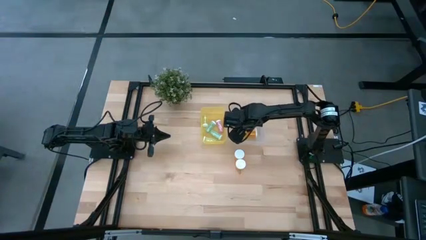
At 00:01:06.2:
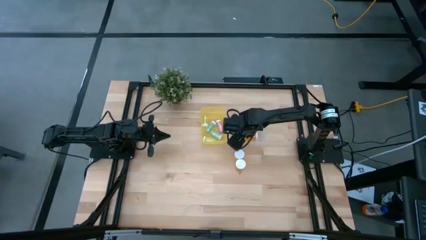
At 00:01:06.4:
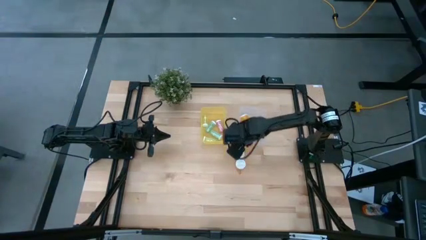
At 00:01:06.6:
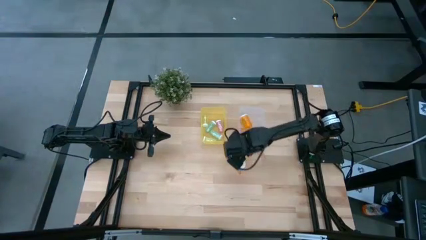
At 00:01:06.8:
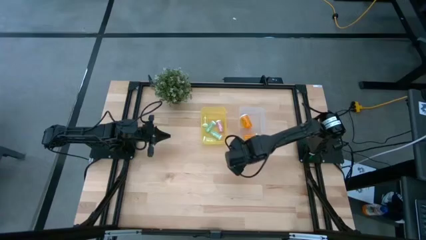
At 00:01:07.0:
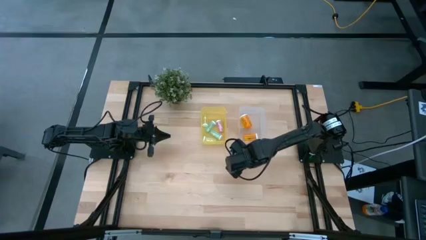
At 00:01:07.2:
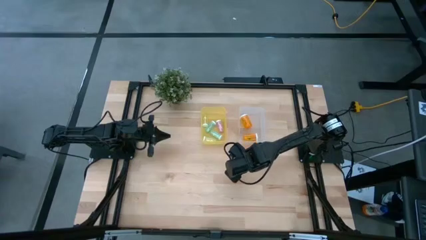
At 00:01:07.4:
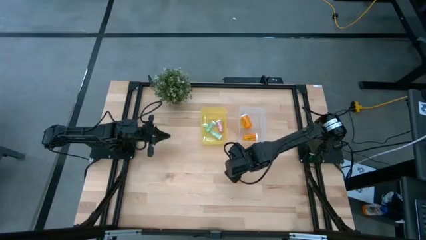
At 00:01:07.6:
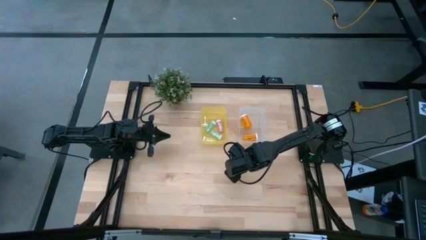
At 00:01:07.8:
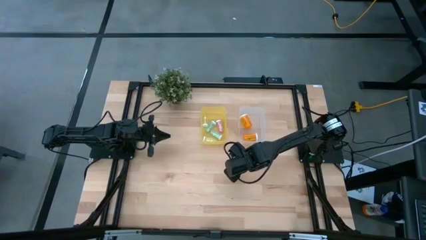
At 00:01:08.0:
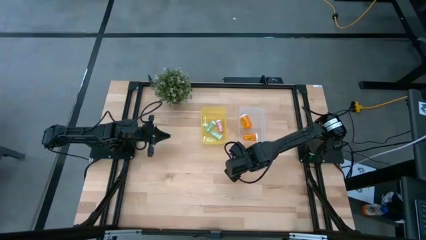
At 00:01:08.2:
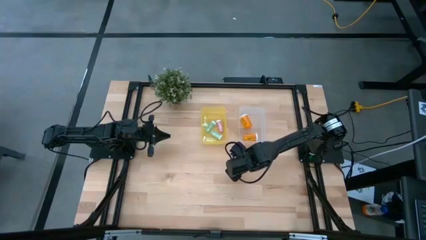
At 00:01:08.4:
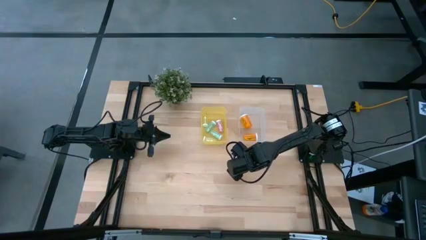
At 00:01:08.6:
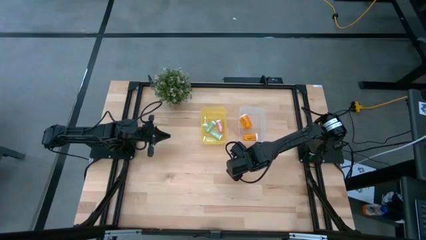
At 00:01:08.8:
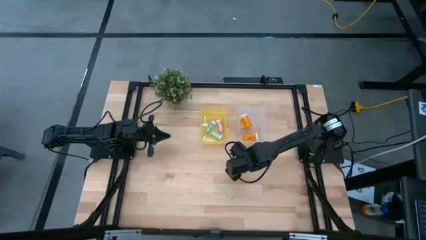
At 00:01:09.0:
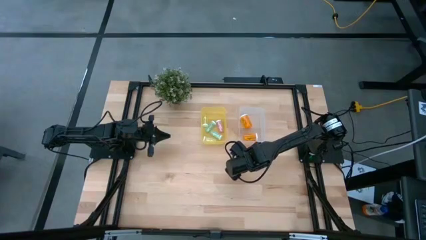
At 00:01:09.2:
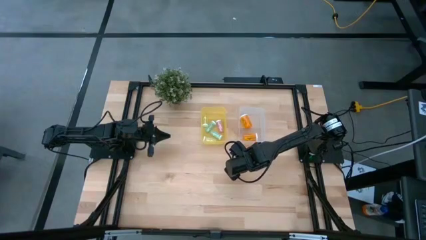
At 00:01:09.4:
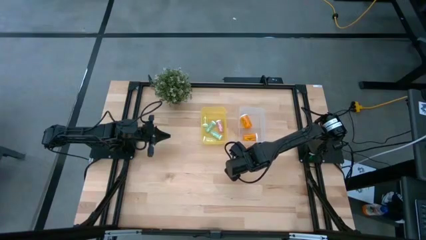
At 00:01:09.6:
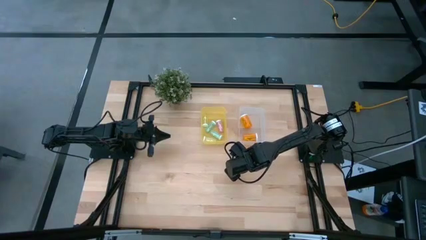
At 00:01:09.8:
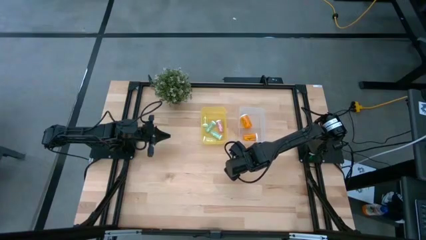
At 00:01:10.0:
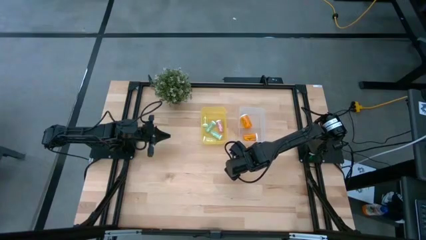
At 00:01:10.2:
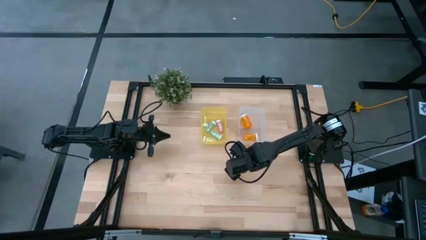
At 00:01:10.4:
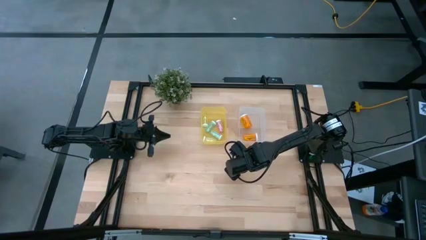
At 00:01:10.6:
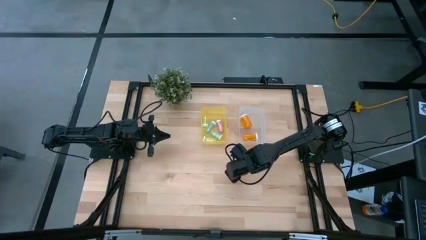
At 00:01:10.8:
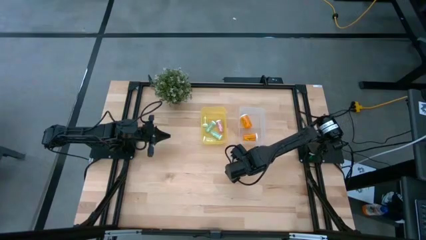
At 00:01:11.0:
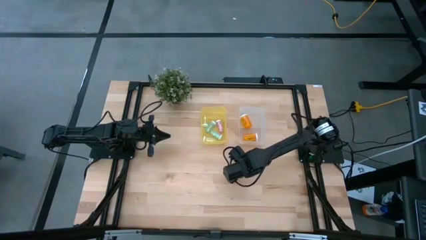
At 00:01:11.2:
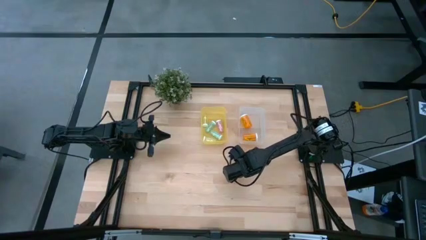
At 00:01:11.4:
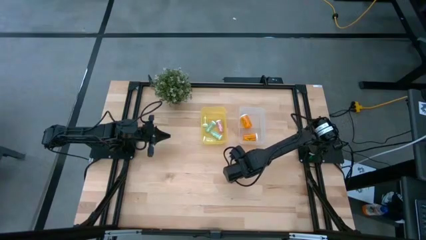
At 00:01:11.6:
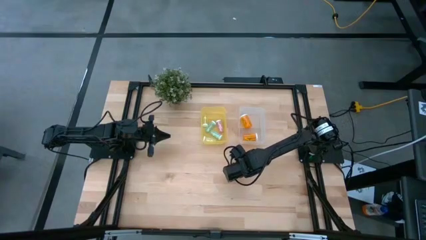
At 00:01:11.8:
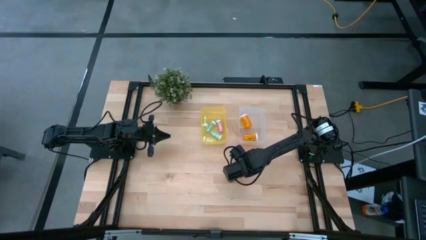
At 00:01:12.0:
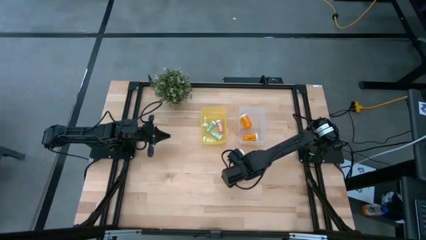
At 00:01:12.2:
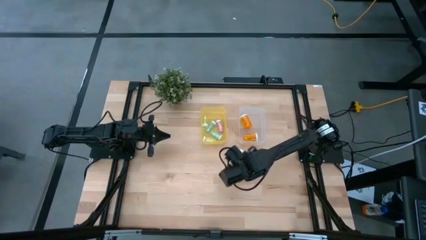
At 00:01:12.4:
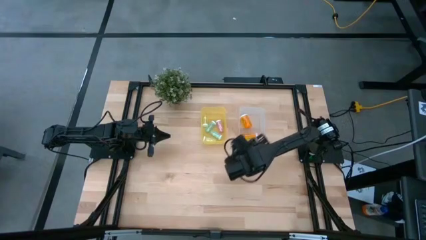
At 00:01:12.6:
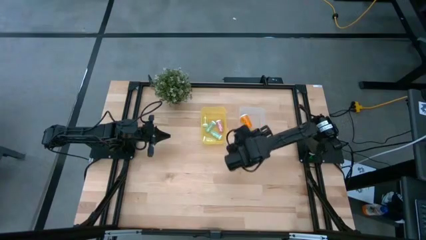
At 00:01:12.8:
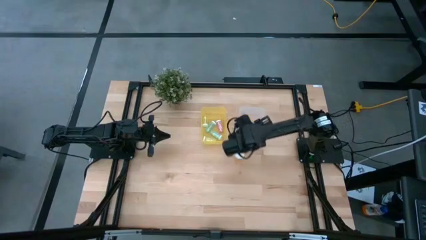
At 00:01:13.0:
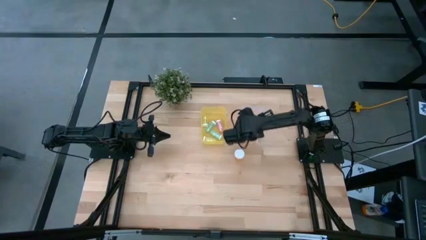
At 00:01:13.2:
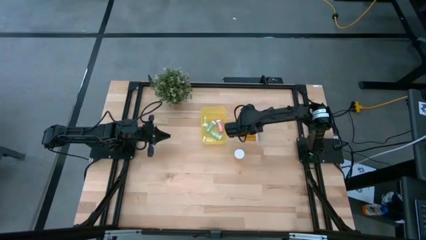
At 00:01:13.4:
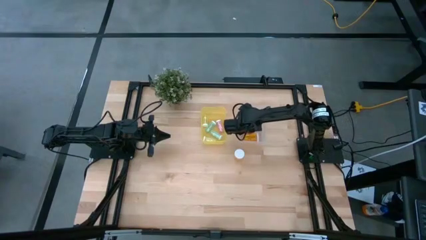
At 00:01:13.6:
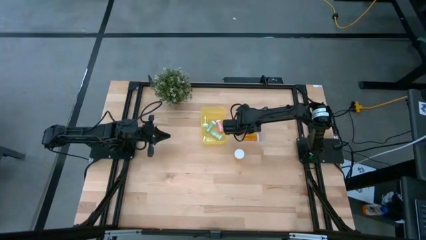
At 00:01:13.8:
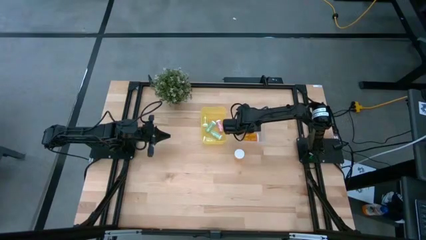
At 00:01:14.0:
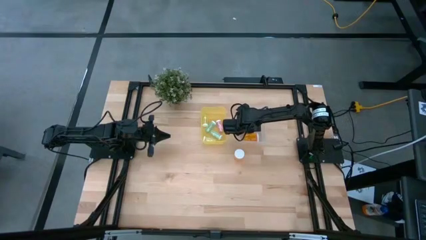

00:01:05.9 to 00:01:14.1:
Task: Pick and place medicine bottles into bin by pill shape (circle, oval)
Put the large orange pill bottle into the transparent bin

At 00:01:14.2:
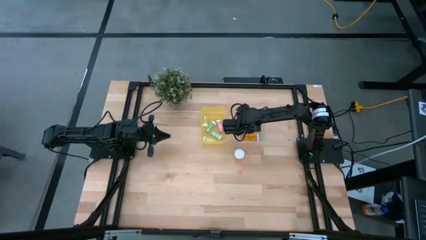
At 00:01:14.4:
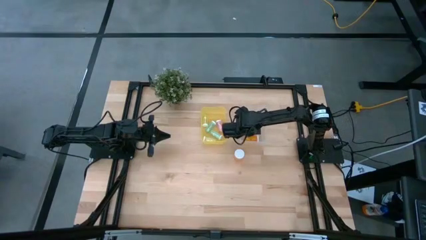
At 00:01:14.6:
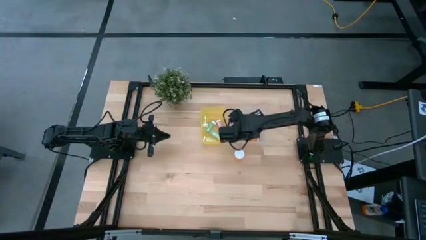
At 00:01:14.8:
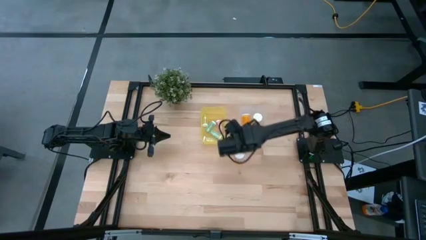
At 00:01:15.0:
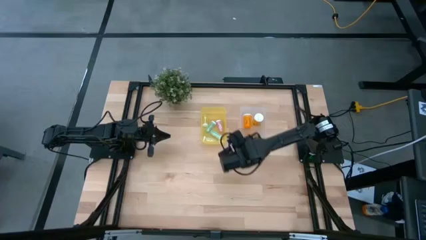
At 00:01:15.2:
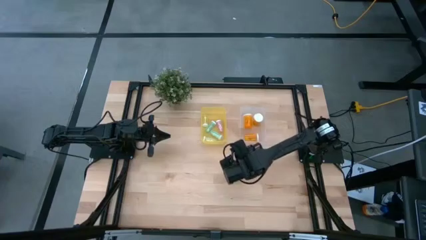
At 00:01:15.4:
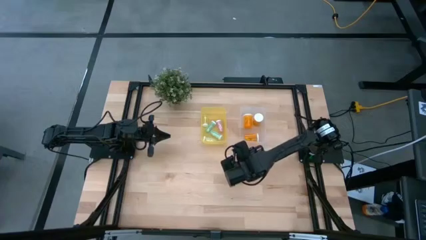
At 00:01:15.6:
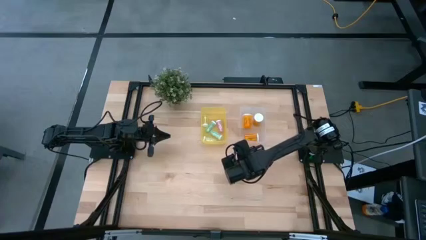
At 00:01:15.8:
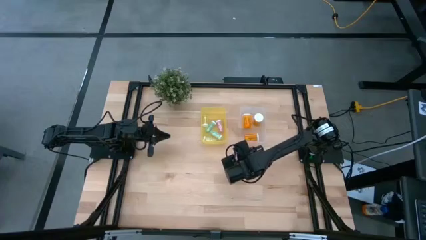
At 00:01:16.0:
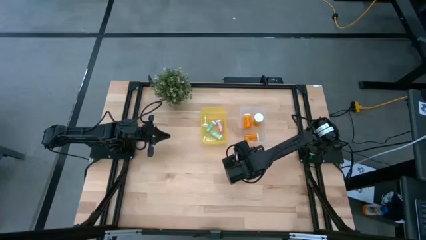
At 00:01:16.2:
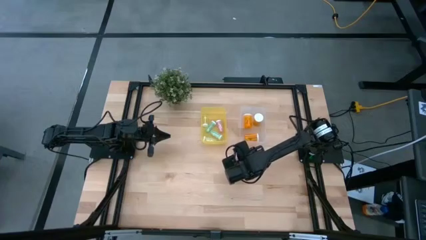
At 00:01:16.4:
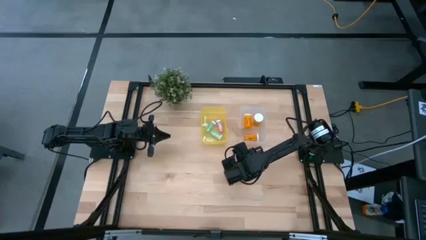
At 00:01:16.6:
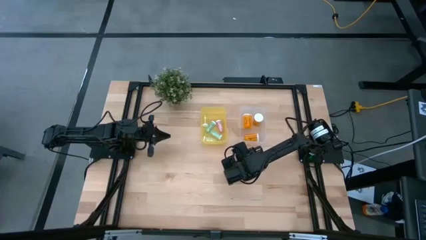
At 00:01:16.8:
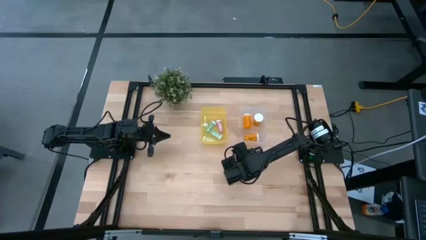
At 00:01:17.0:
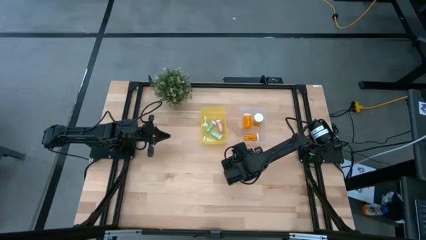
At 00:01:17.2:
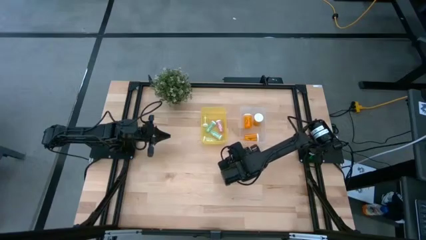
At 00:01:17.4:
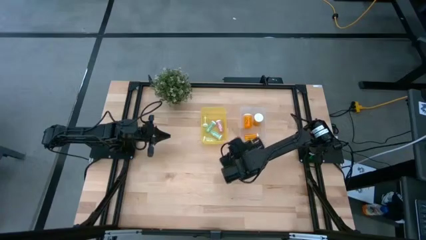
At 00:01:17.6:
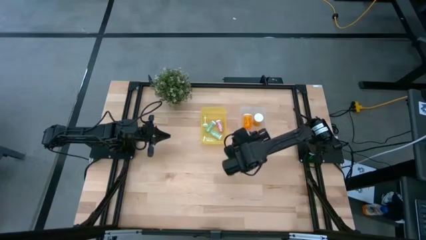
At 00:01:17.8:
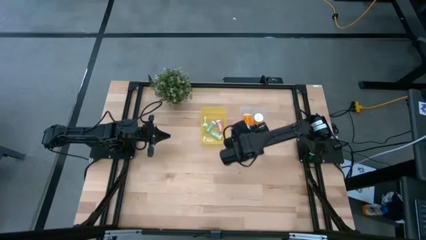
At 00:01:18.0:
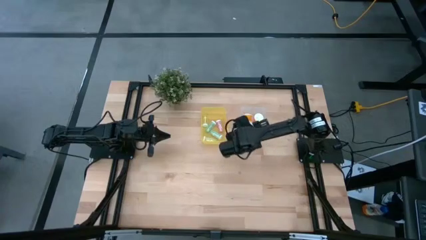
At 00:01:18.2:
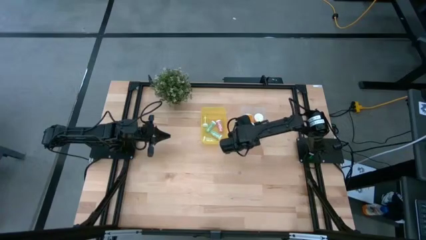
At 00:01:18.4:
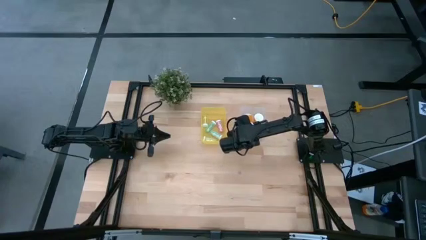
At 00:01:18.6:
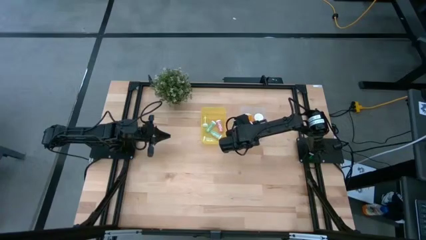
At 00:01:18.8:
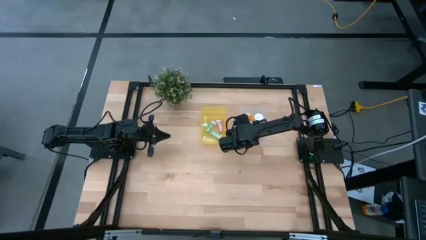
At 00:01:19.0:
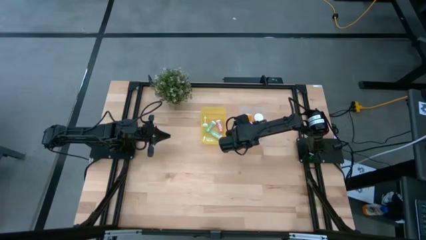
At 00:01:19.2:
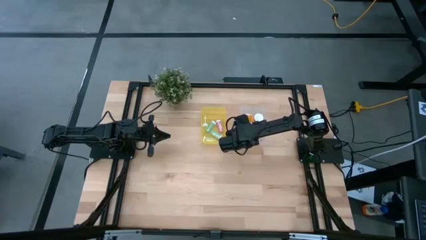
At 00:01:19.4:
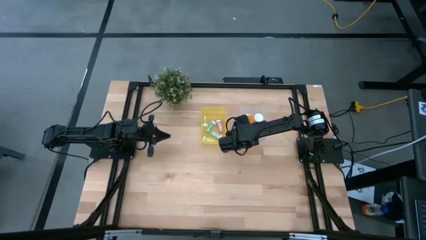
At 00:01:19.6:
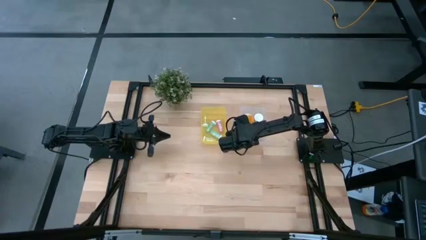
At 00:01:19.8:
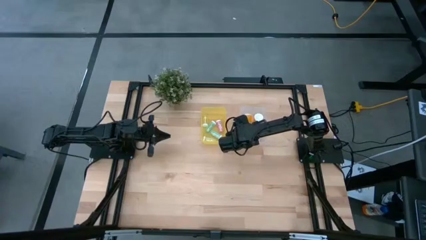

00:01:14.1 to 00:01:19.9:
Put the large orange pill bottle into the transparent bin
